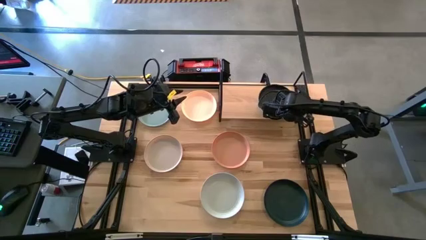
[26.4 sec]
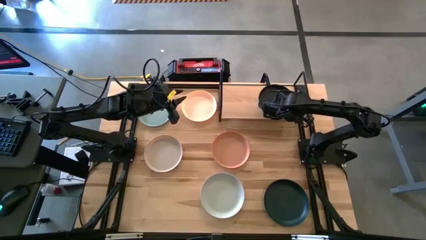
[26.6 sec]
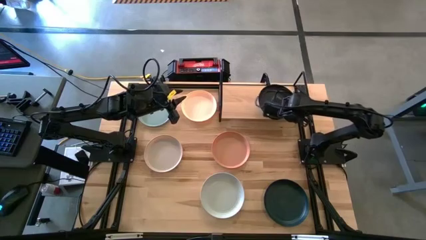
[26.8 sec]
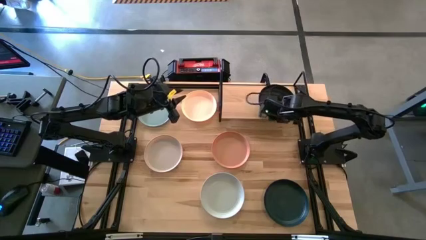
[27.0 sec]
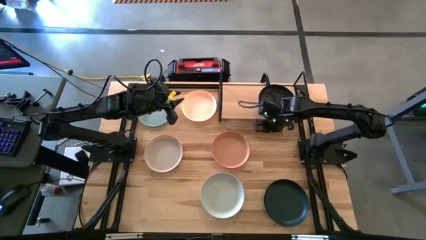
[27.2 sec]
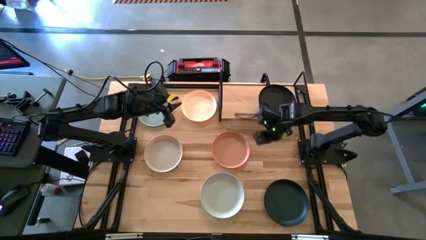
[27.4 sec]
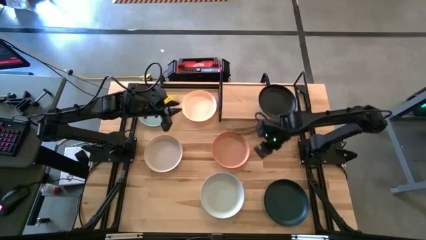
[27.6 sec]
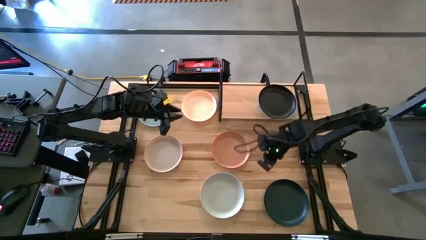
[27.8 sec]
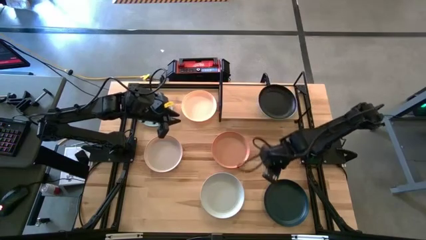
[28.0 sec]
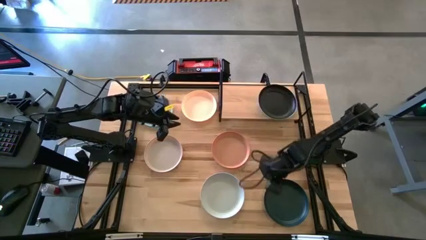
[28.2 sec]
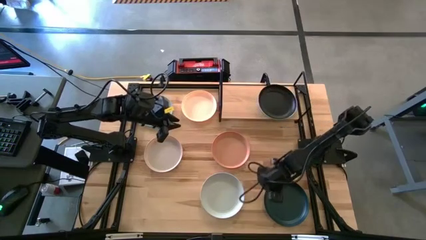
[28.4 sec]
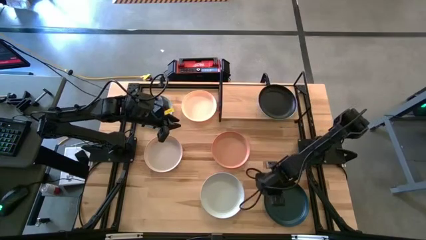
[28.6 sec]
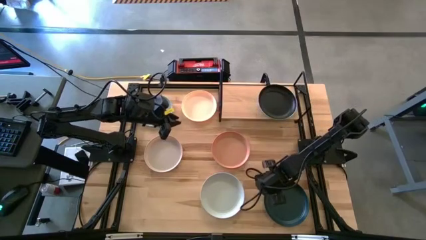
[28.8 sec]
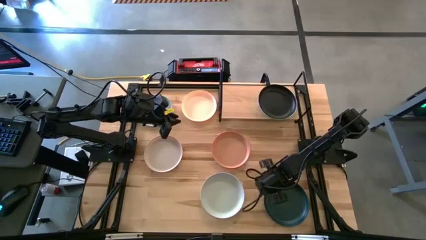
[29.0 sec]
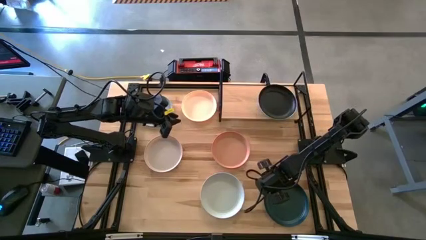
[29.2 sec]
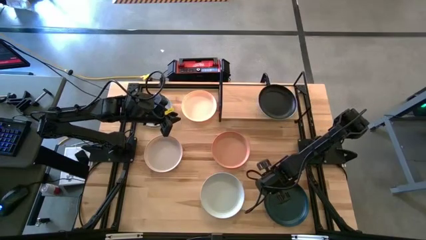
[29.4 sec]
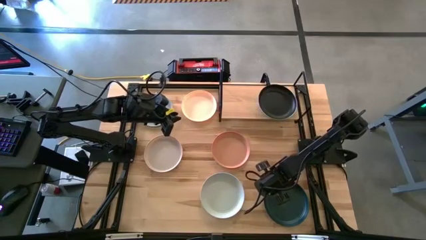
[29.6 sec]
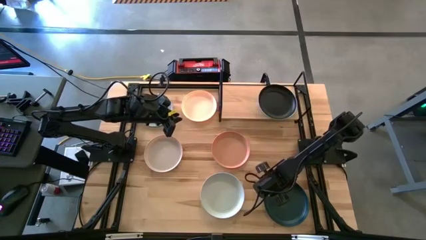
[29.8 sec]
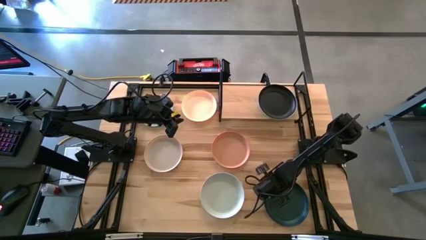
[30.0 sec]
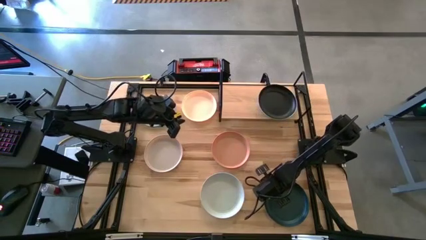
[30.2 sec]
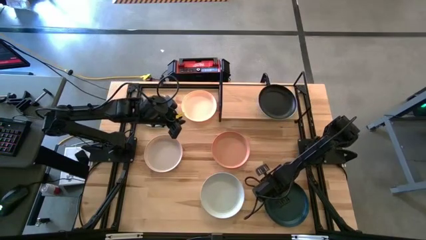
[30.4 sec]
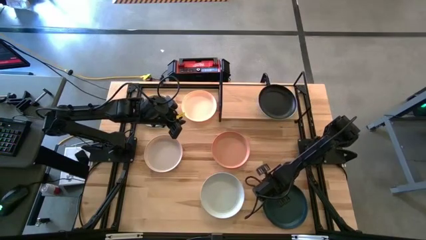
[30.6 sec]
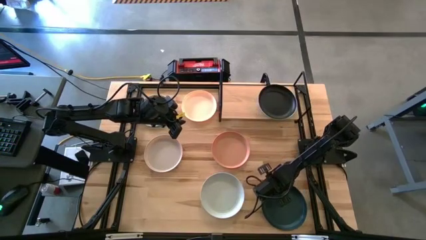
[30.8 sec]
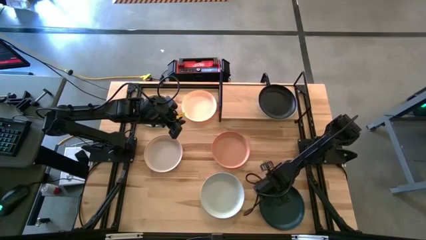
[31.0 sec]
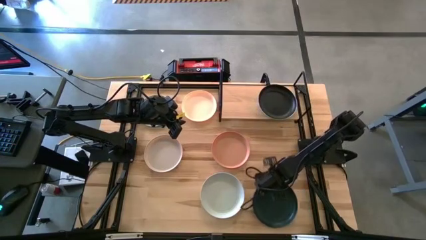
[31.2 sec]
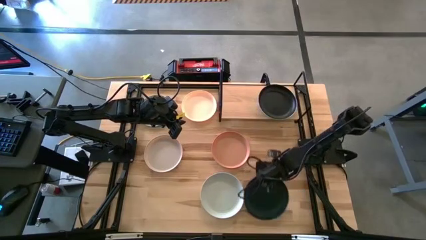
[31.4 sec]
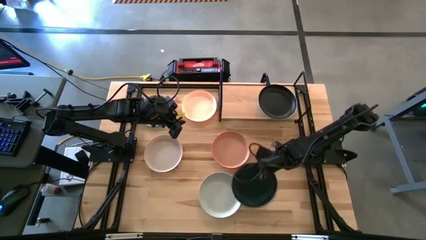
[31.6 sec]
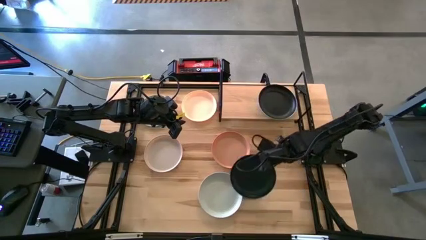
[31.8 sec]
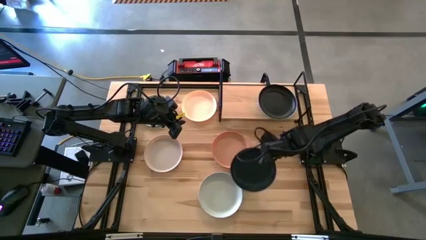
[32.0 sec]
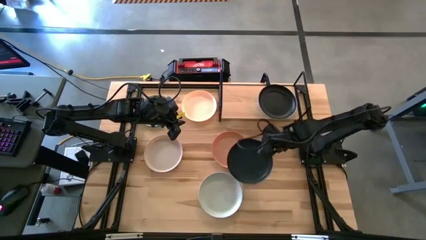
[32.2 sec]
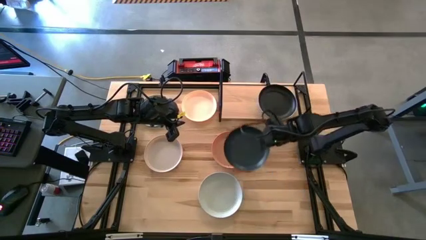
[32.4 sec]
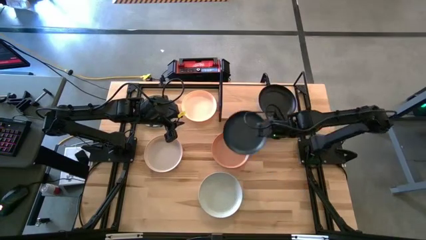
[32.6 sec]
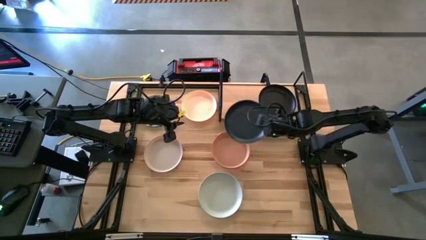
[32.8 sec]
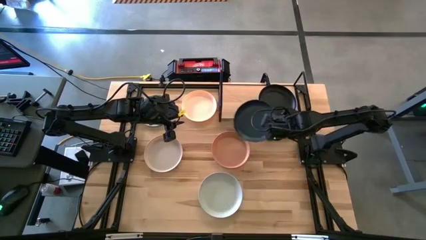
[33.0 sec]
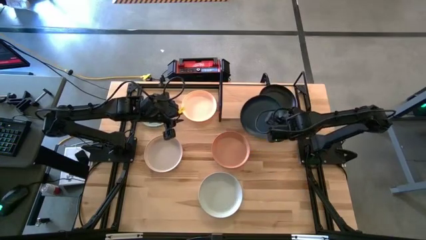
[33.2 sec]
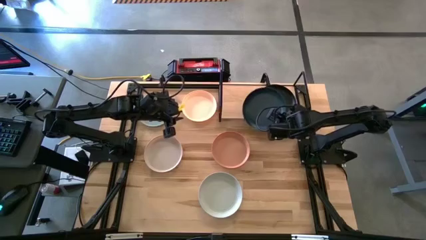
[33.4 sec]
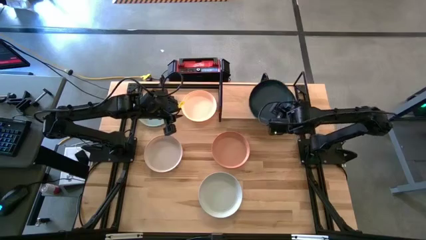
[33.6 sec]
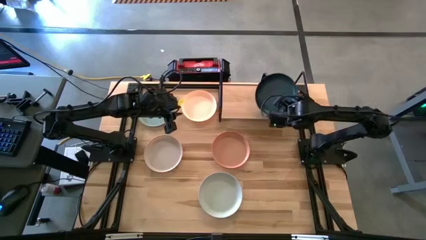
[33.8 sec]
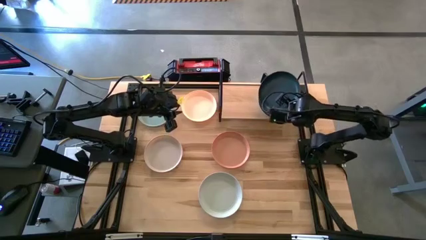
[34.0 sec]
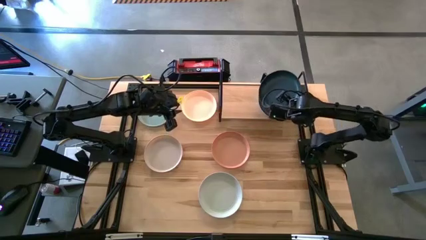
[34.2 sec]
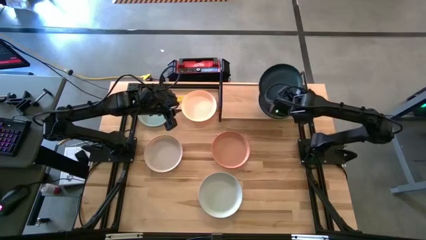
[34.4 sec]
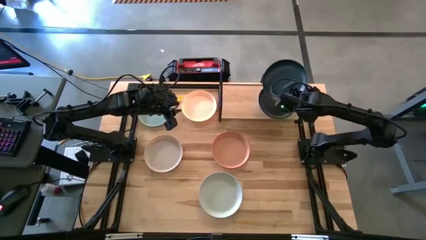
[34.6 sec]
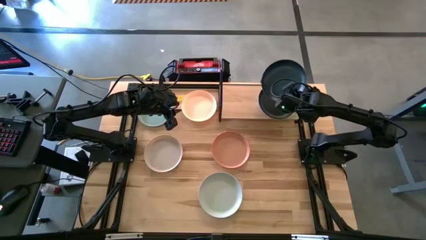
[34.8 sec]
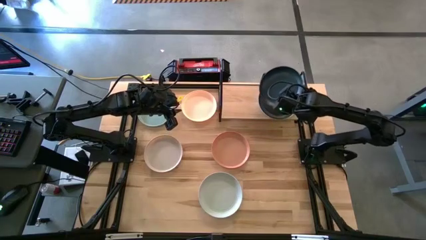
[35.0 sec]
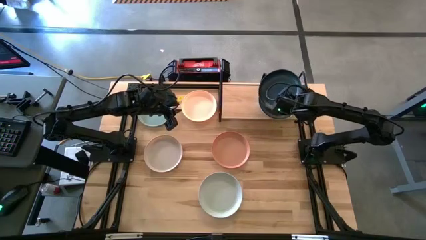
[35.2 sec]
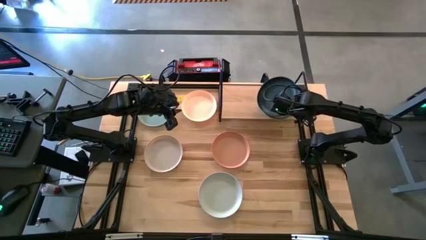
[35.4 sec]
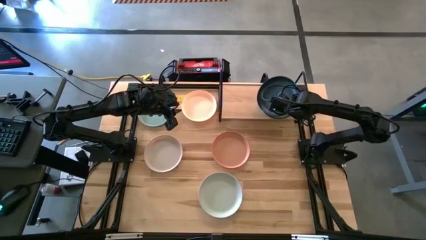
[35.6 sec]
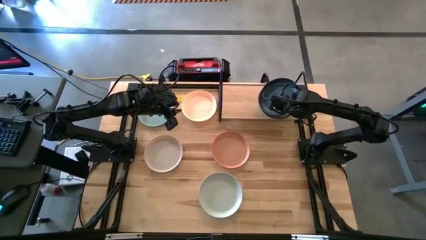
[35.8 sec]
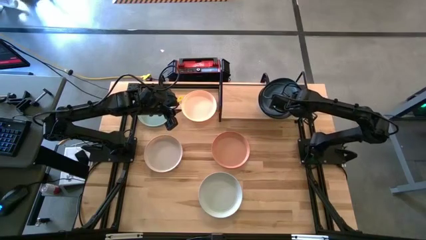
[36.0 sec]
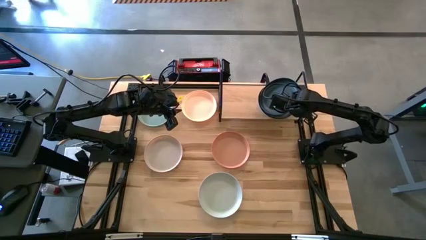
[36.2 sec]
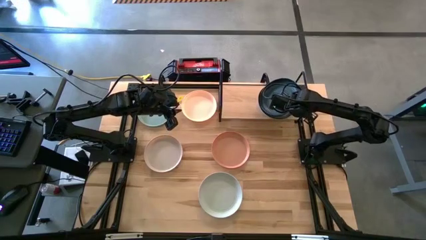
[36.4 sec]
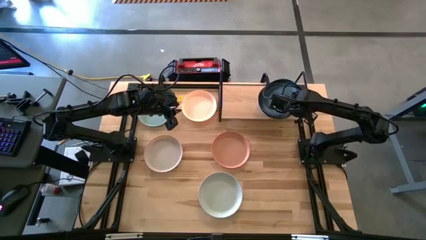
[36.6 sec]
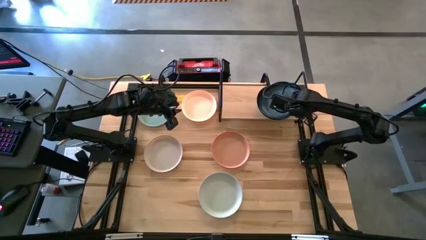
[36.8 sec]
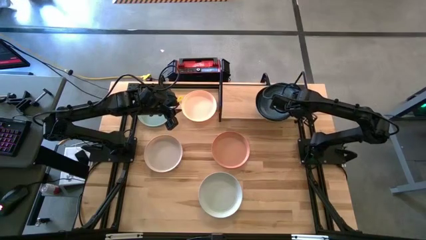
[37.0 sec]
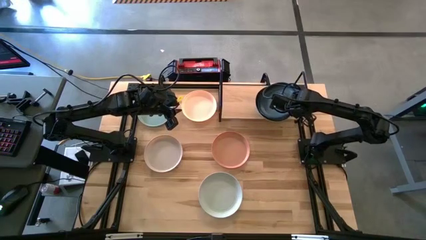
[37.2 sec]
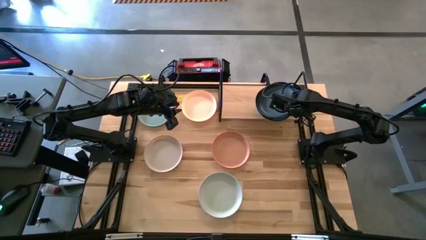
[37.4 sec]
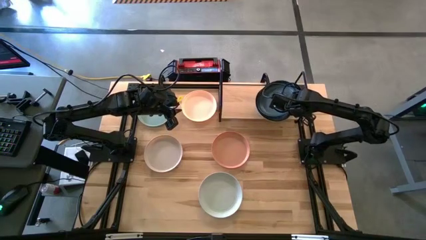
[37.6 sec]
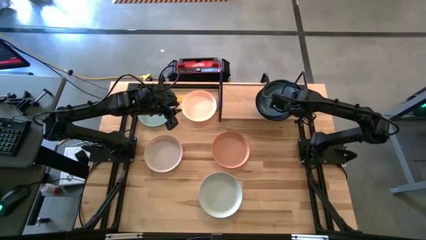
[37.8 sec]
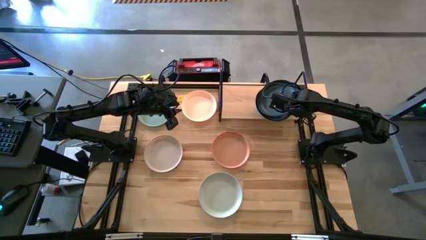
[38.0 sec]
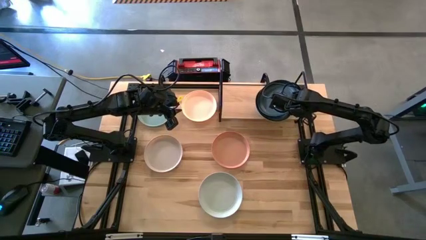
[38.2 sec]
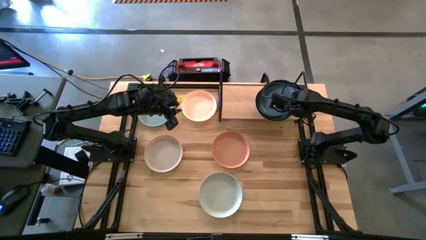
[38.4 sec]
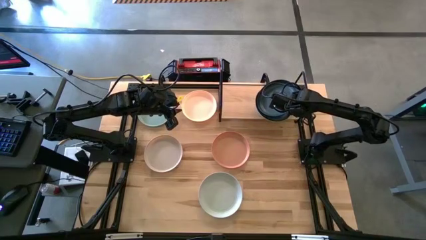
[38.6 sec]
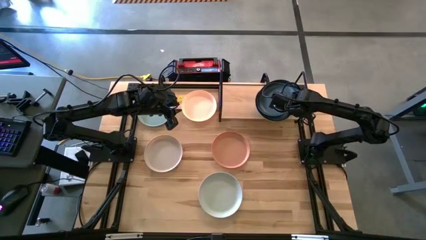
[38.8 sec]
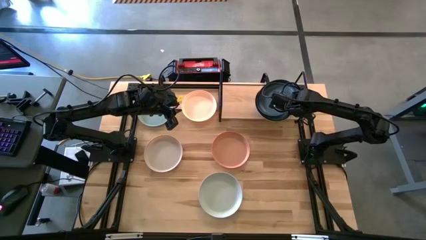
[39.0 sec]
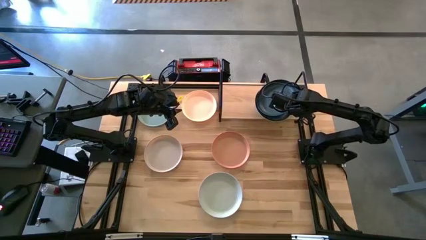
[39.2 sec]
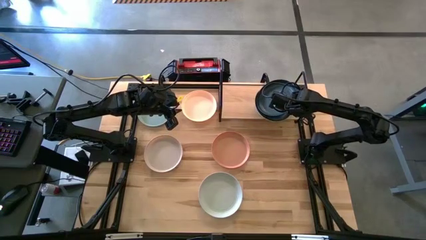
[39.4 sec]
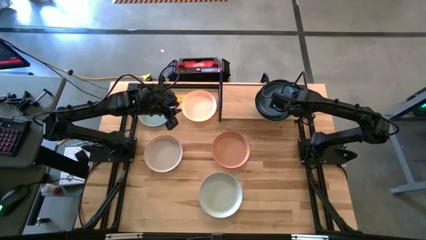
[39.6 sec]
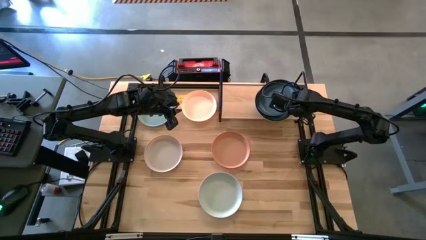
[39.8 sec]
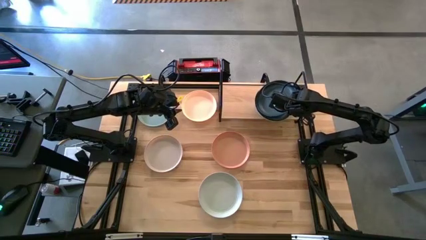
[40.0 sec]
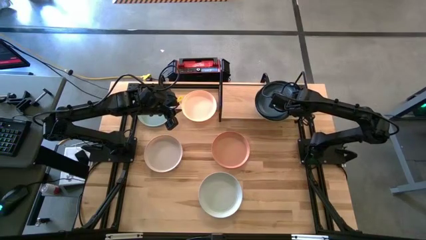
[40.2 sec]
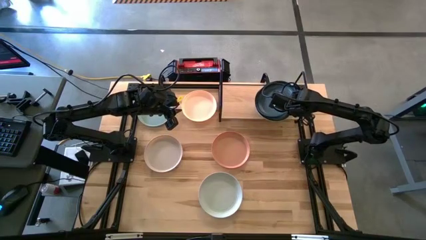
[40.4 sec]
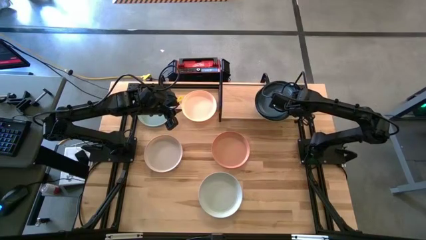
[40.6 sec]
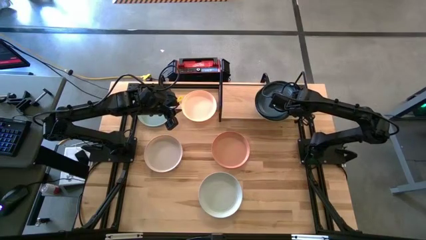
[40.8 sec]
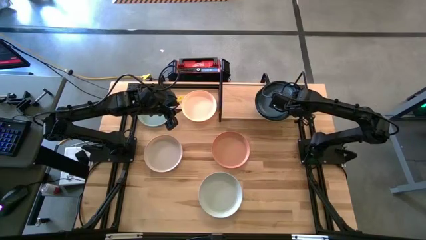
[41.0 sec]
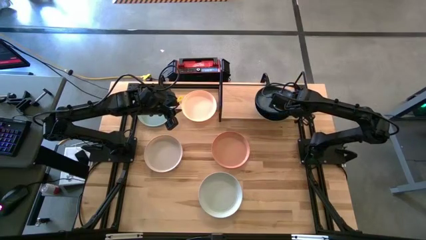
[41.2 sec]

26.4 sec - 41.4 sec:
Task: Place and stack plates onto a shelf
Stack the black plate on top of the black plate
